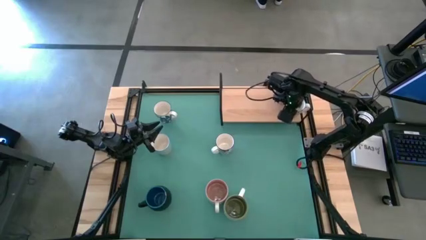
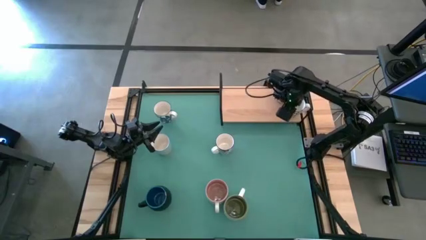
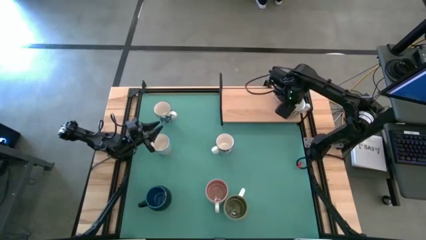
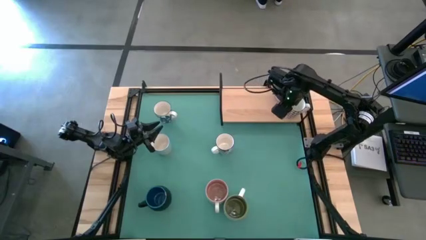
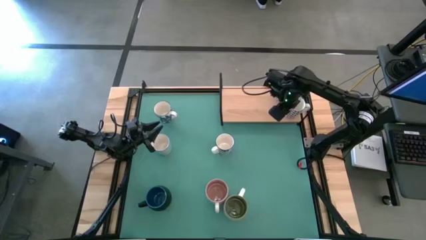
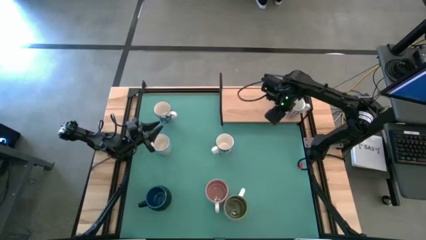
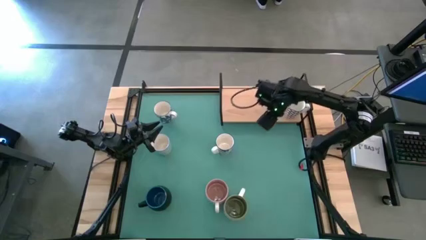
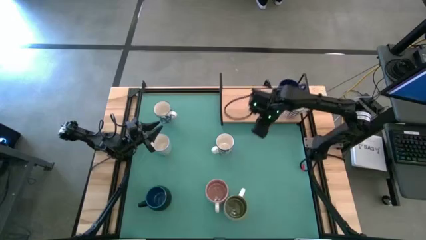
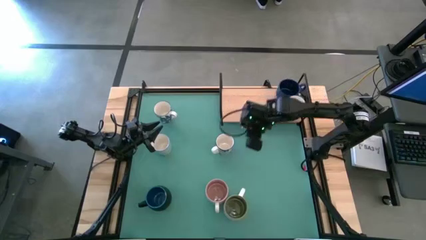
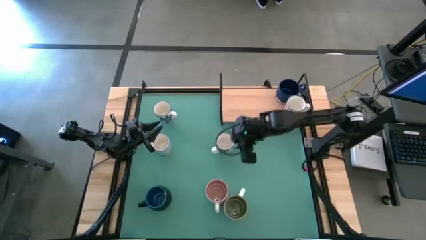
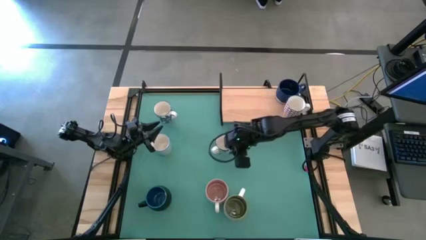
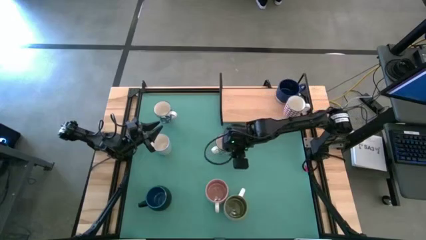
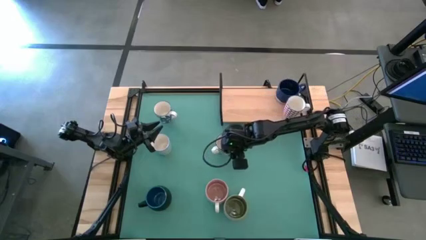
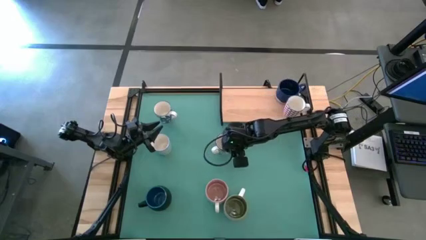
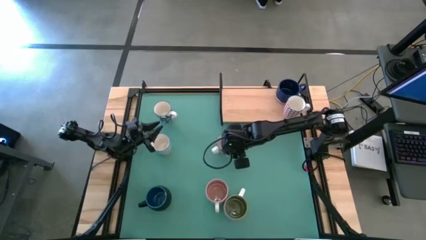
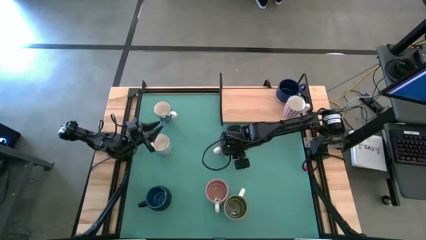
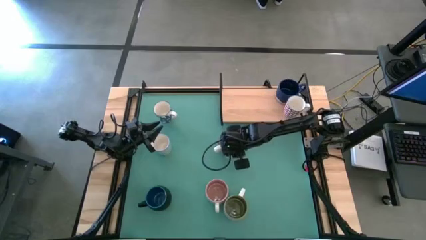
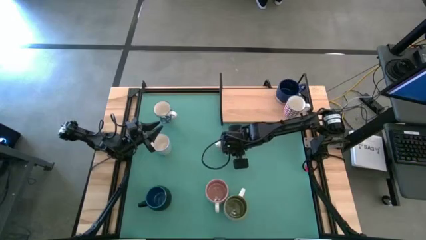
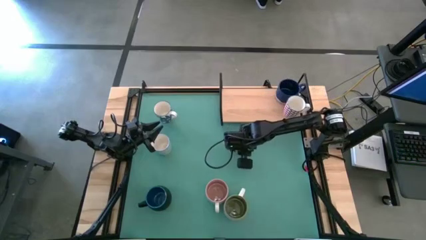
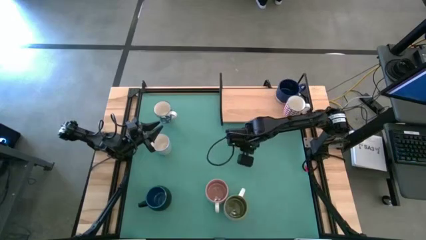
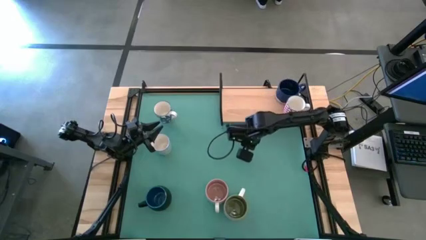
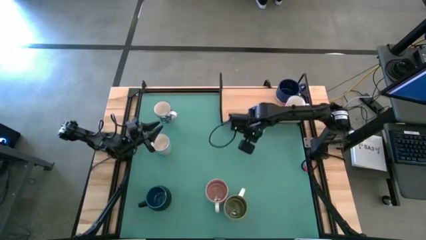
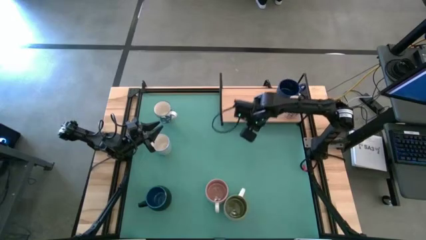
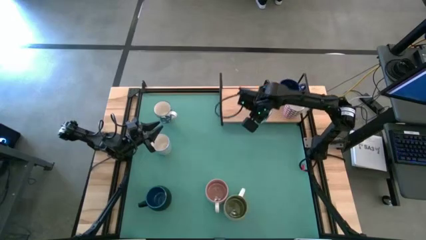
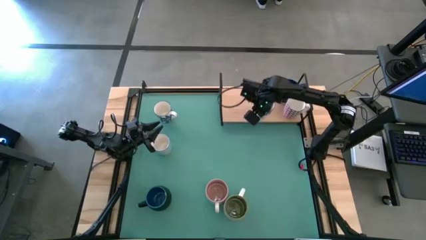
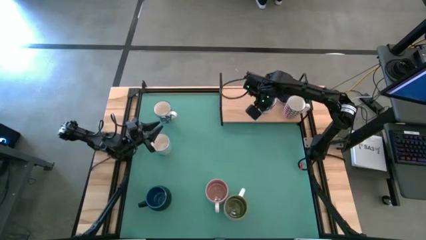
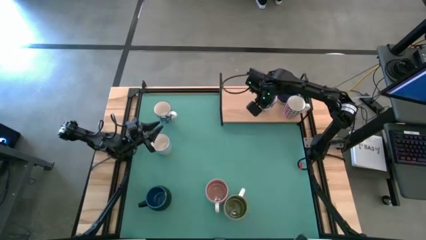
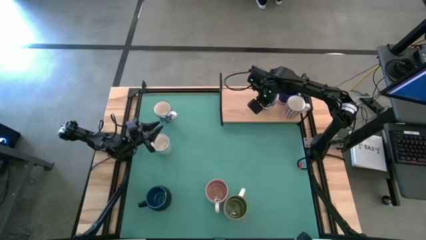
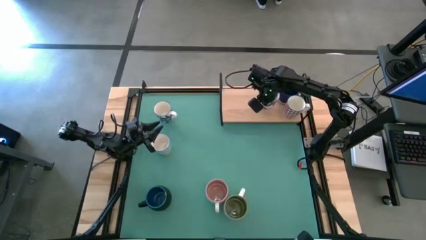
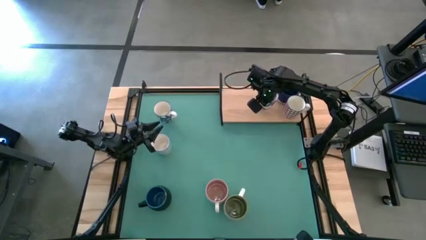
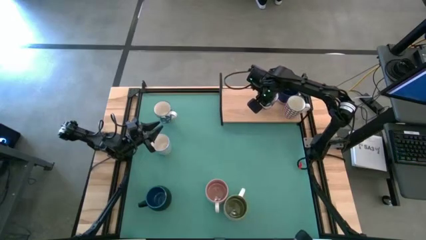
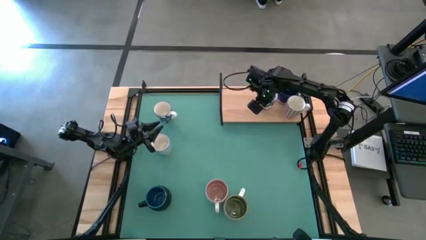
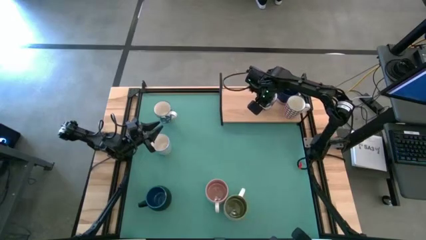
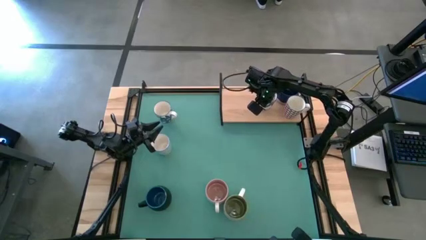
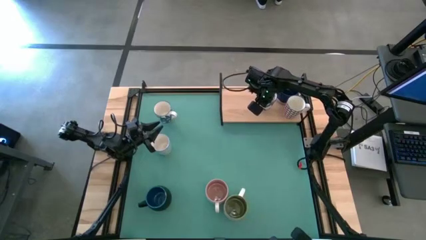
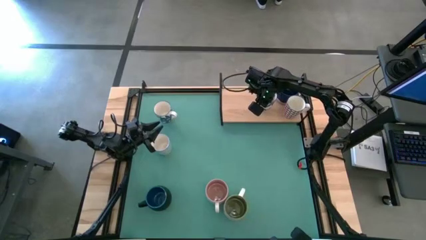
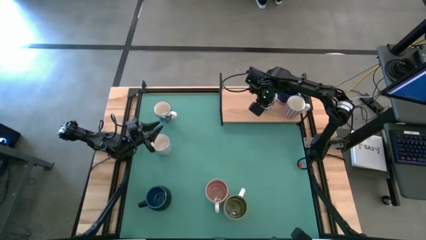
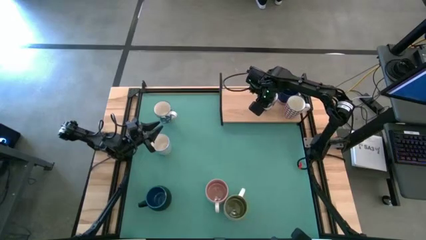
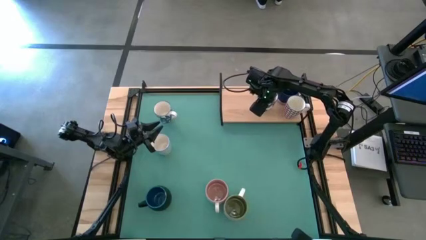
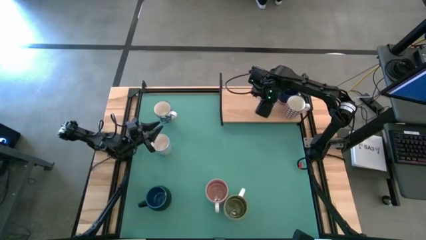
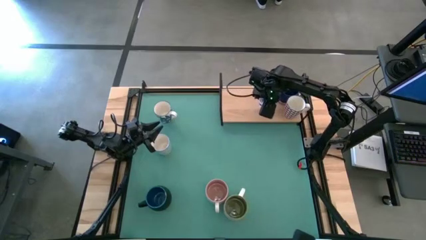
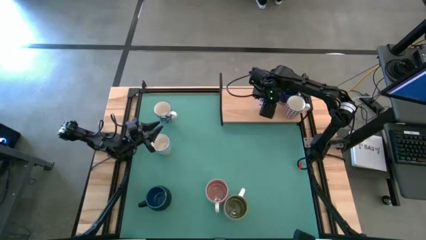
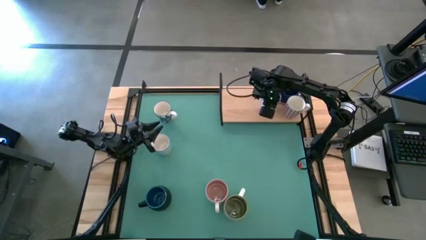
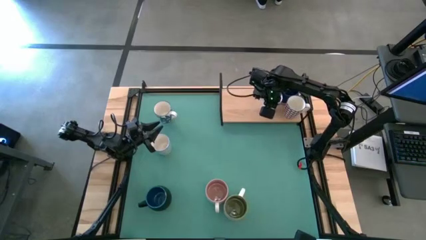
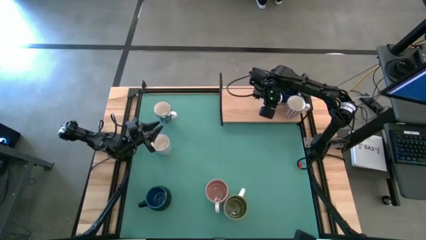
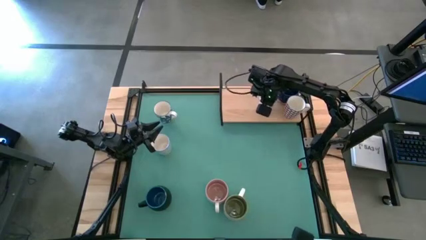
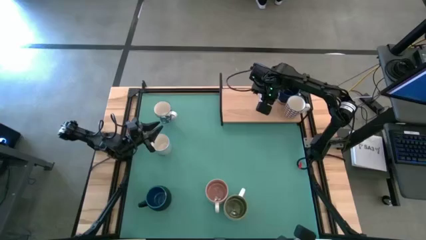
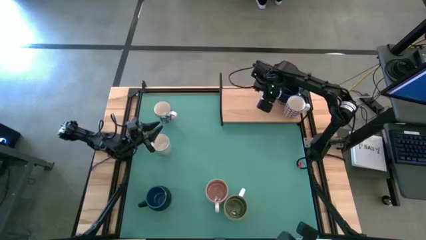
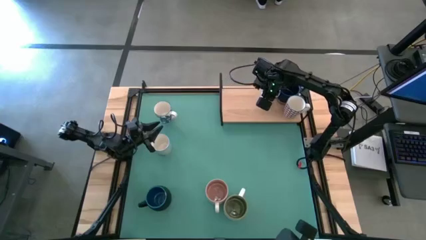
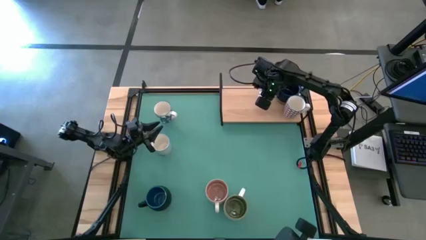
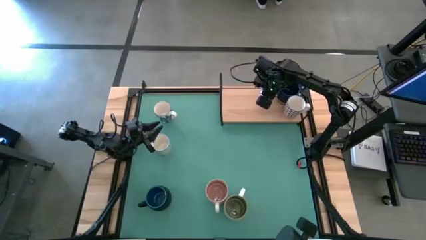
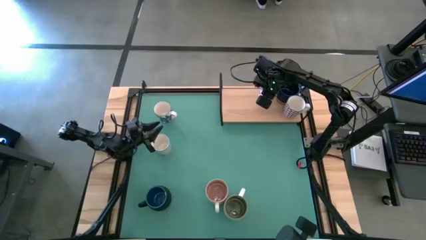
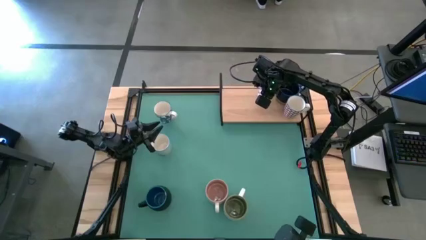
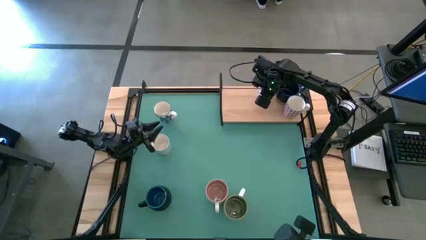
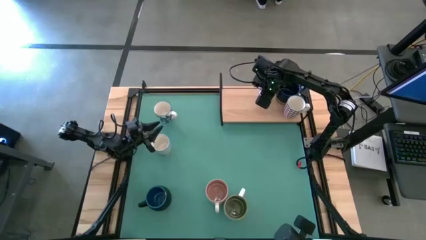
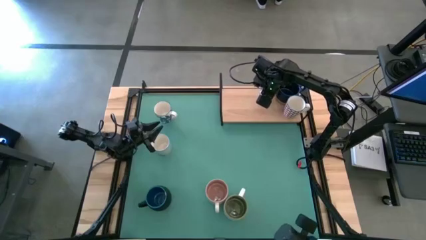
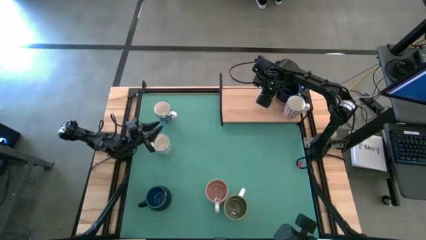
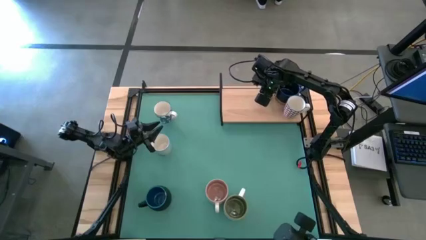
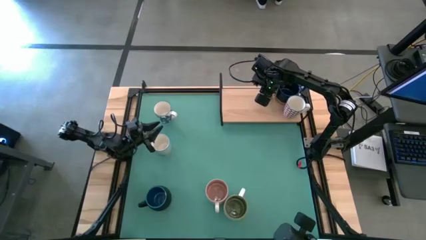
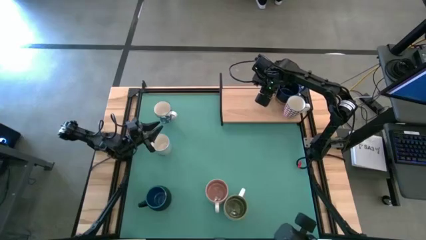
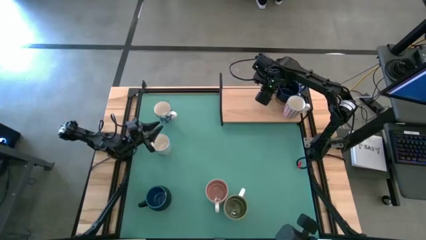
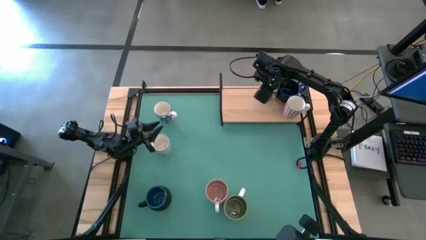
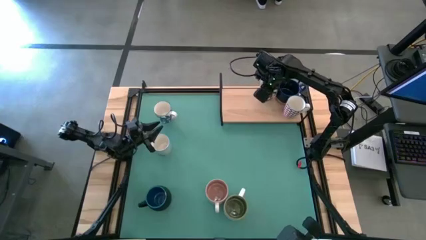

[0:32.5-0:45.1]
Task: Place coffee mugs
Put the bottom blue white pattern mug on the shelf
